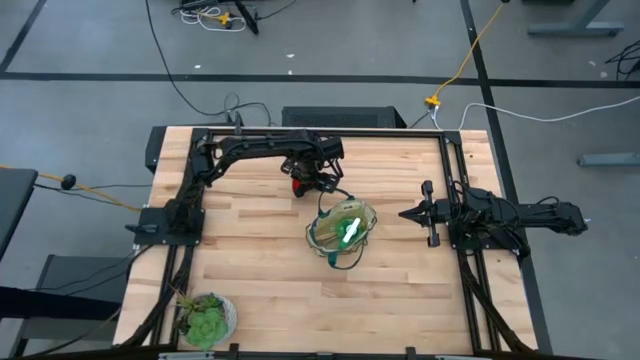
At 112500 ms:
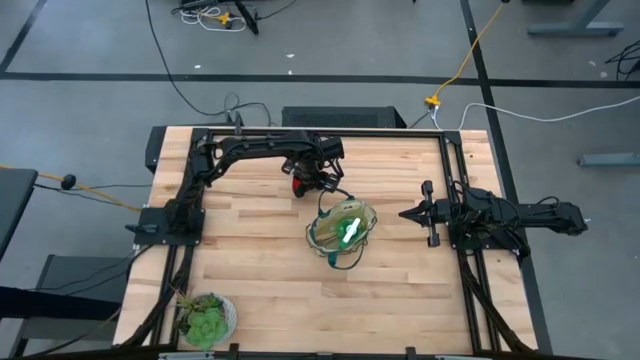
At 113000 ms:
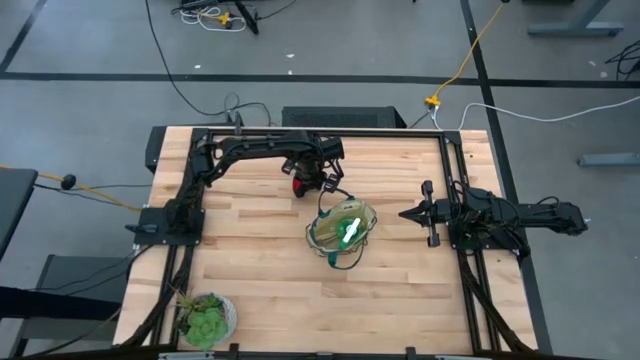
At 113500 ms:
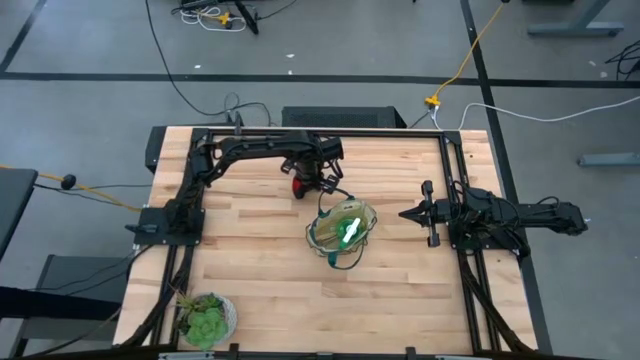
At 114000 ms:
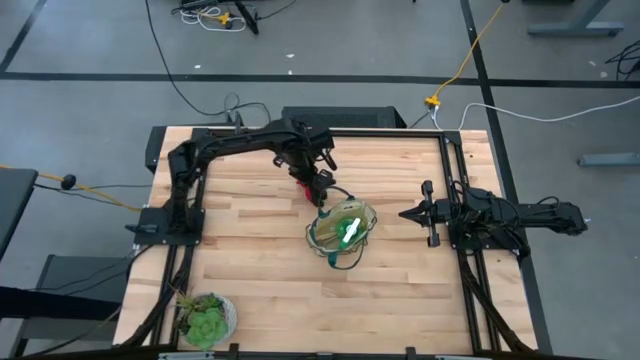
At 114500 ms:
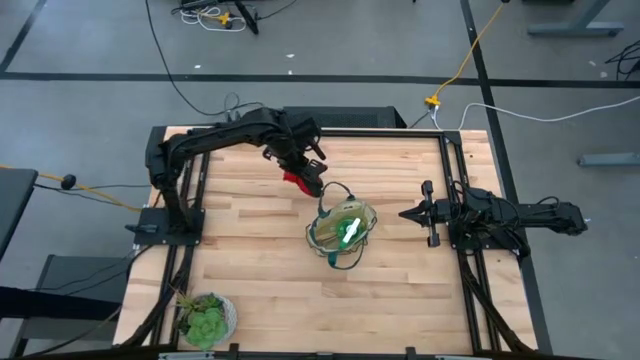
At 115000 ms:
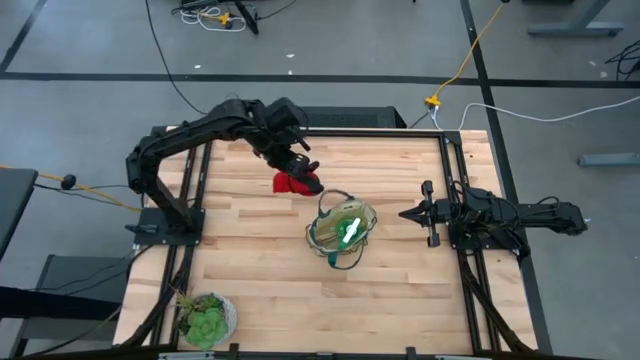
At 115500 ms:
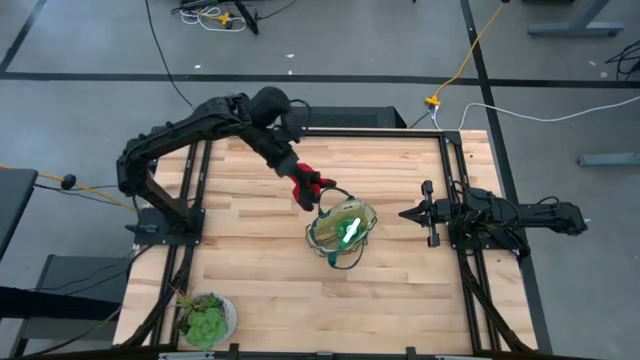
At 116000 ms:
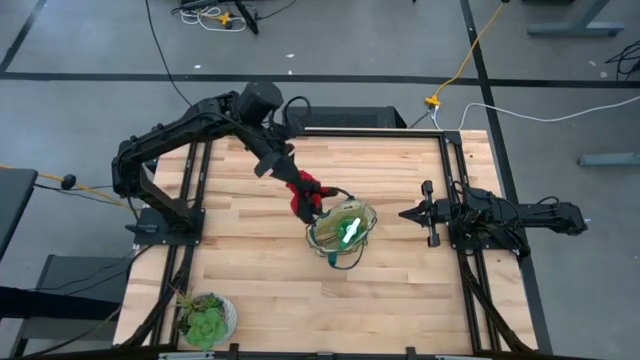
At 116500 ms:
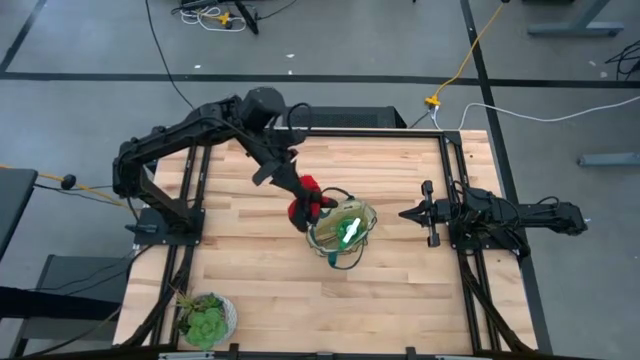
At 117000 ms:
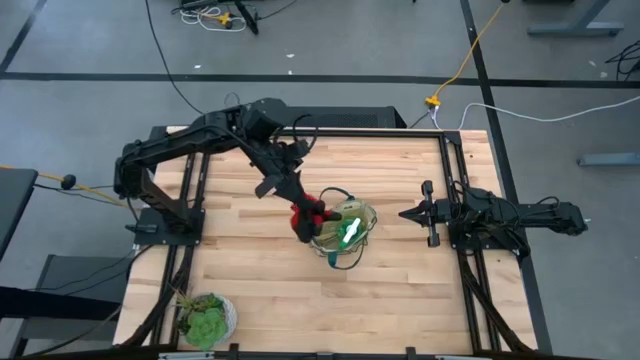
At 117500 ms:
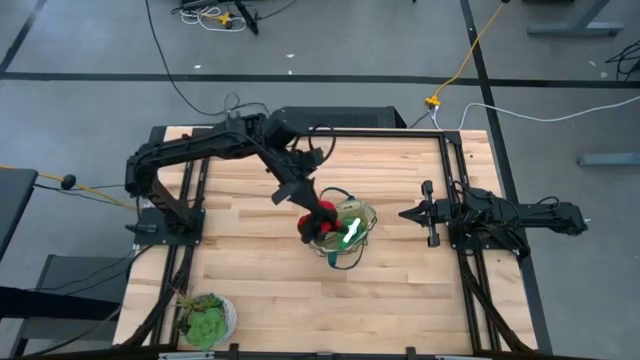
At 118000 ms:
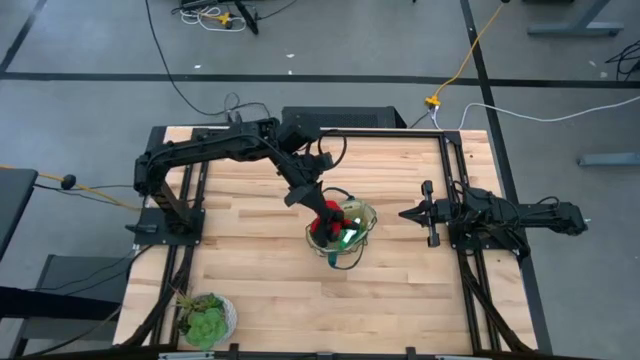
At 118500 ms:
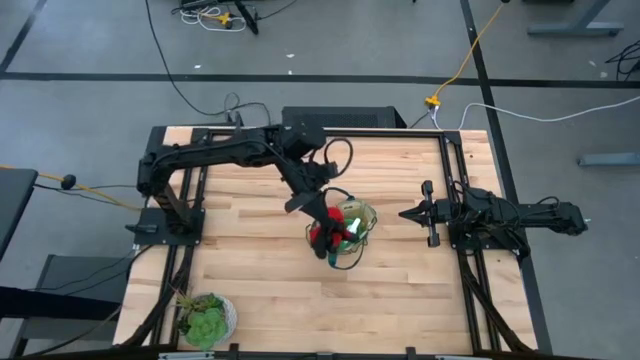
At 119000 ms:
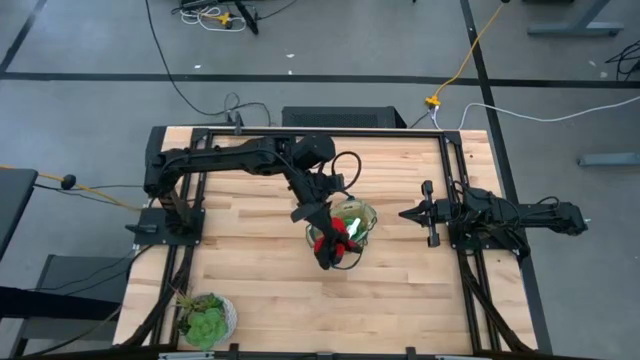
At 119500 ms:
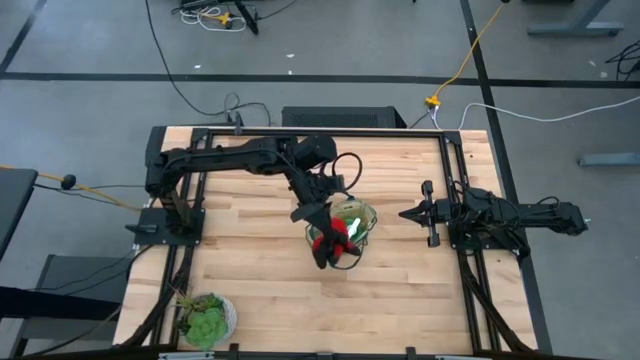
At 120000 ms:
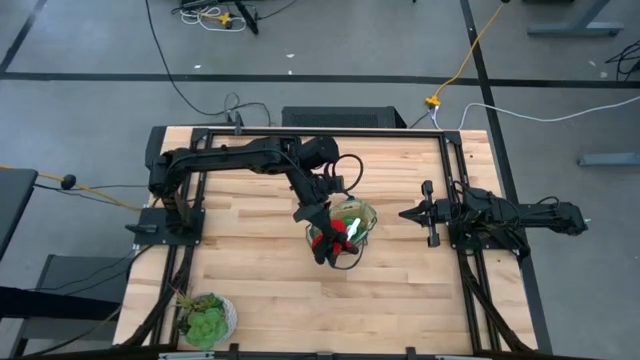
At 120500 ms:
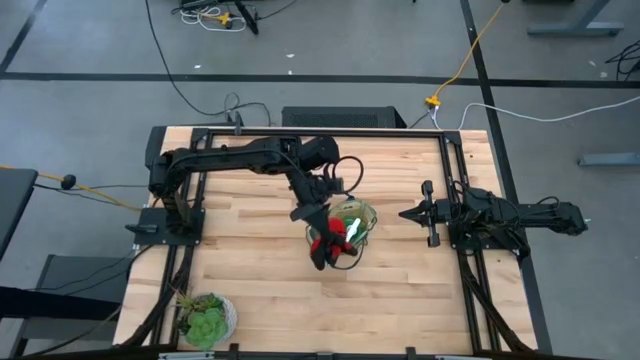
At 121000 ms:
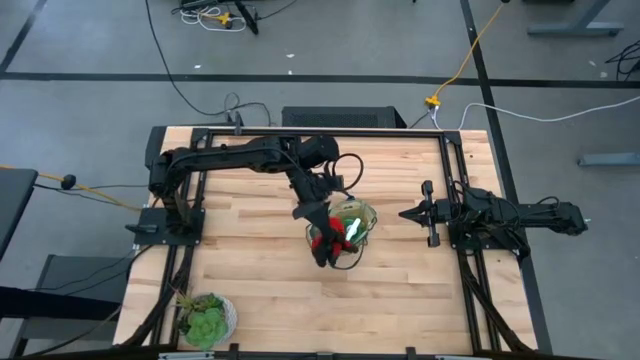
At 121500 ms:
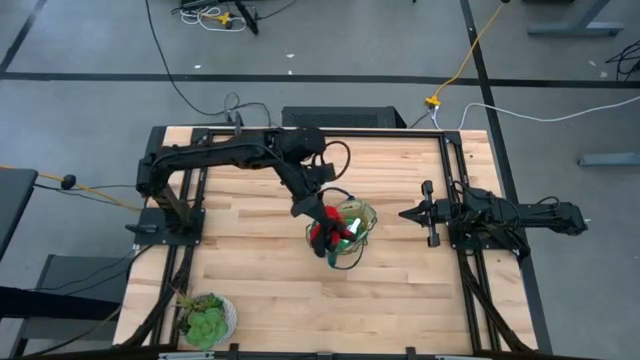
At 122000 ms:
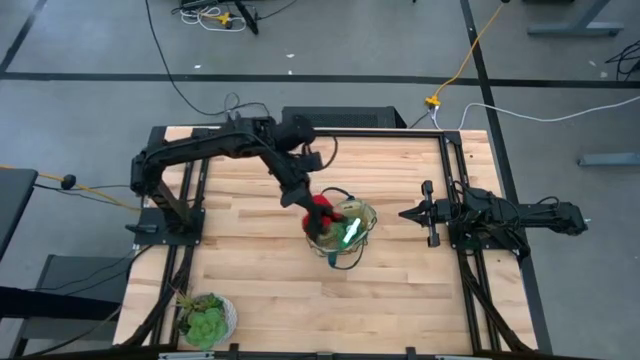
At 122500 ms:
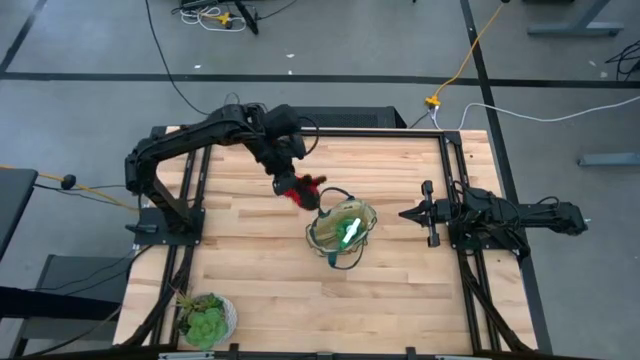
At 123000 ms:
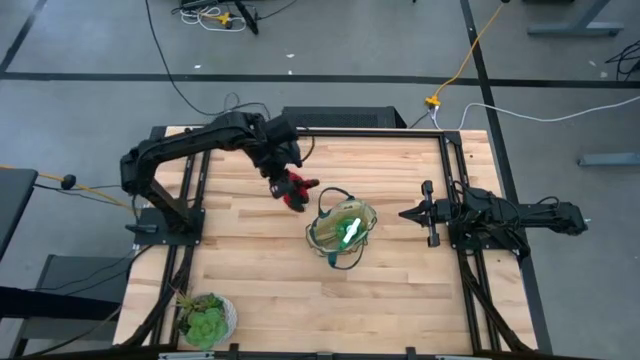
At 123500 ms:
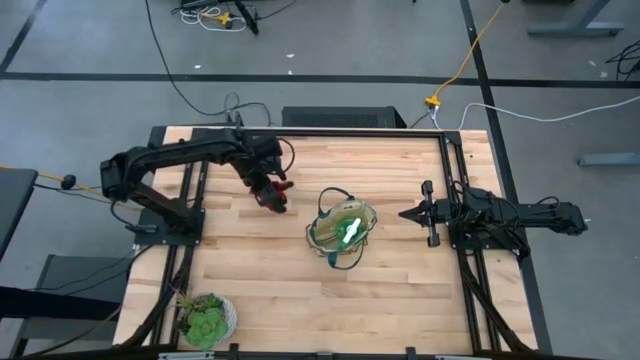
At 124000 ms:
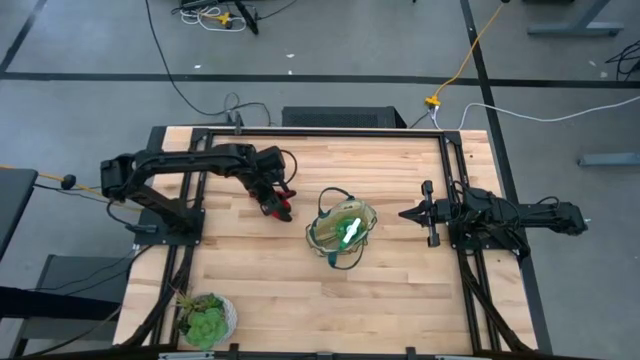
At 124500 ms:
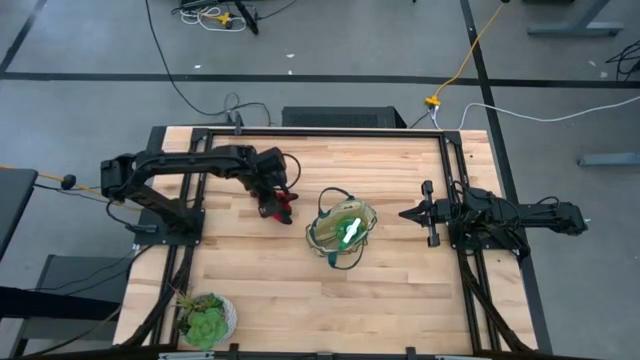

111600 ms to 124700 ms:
Task: Pick & Place Garden tools in Gardening bag
Put the red gloves into the light brown and green gardening bag

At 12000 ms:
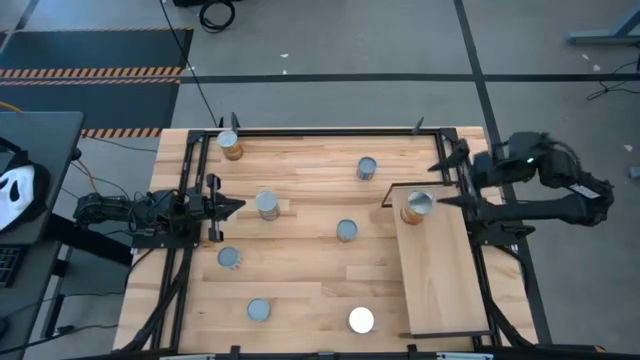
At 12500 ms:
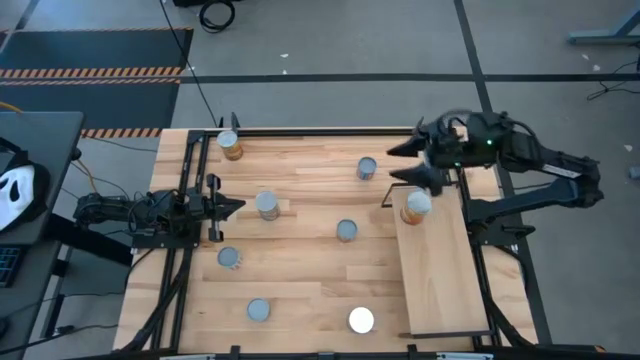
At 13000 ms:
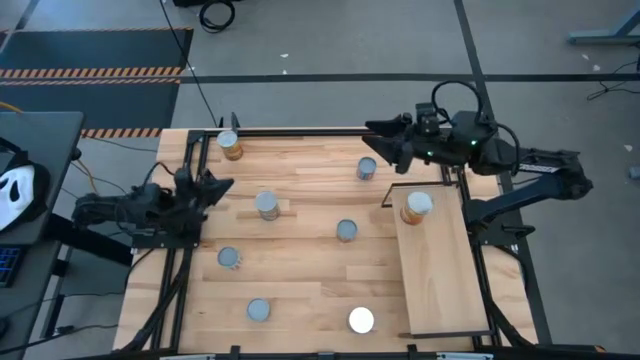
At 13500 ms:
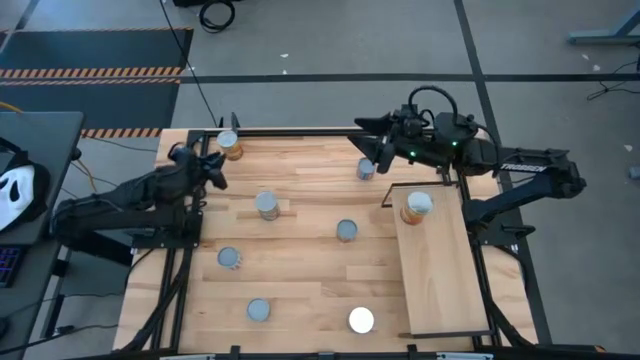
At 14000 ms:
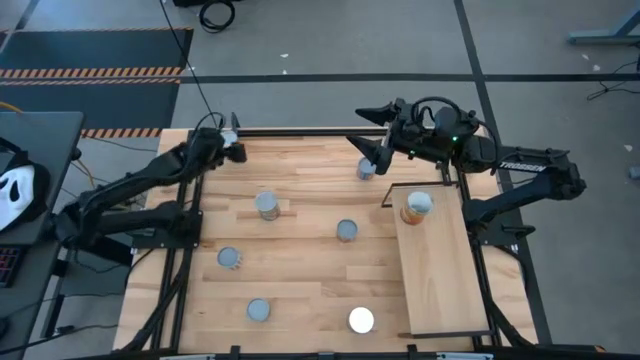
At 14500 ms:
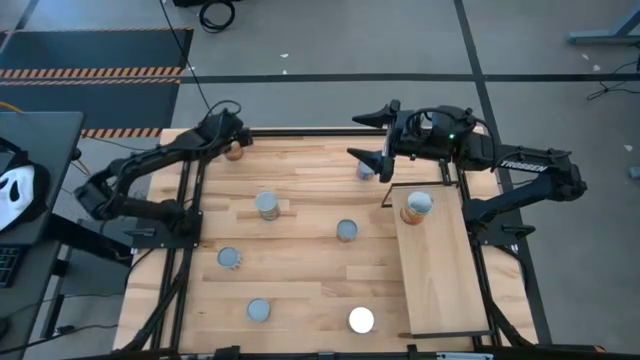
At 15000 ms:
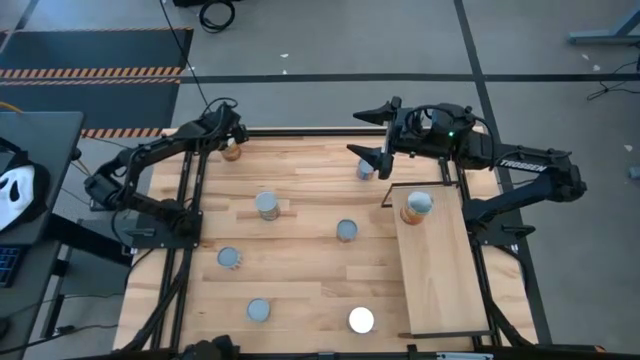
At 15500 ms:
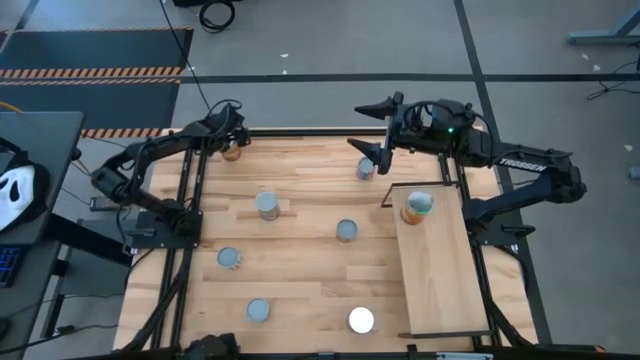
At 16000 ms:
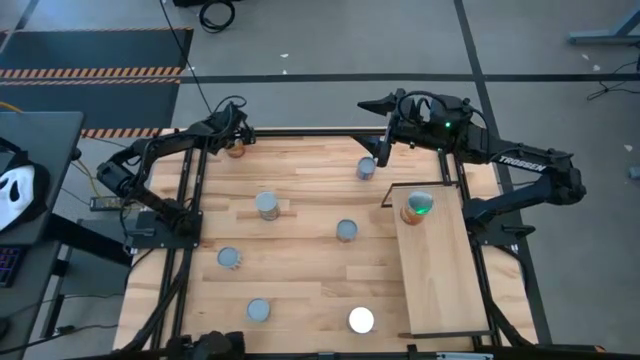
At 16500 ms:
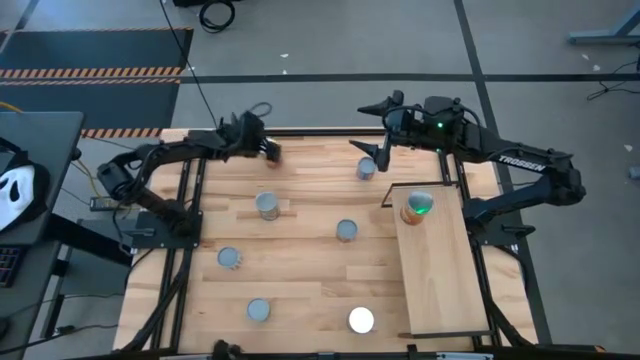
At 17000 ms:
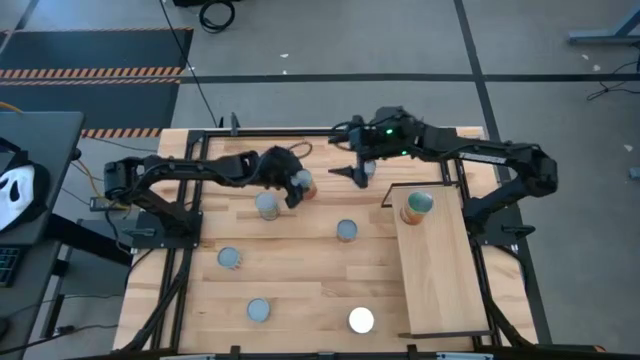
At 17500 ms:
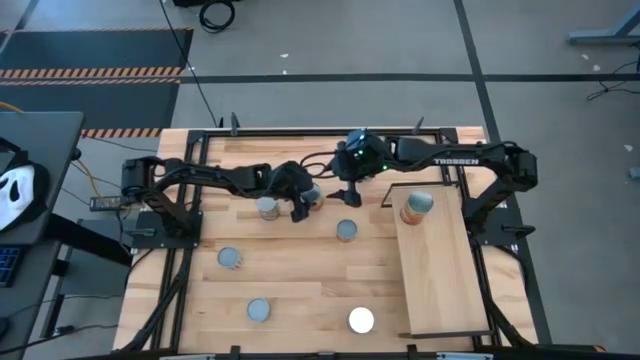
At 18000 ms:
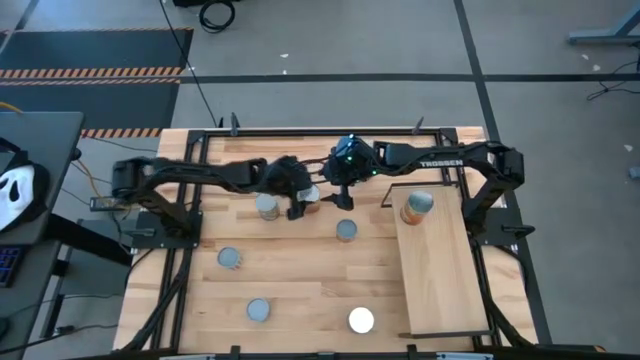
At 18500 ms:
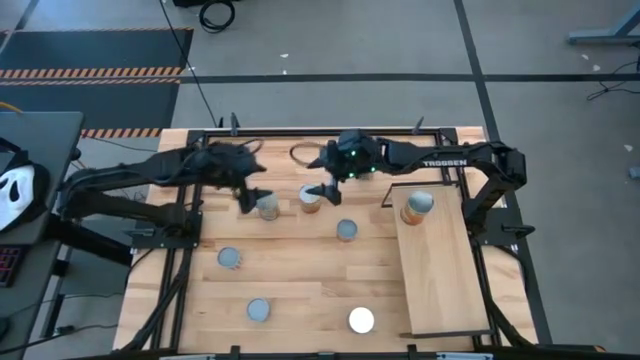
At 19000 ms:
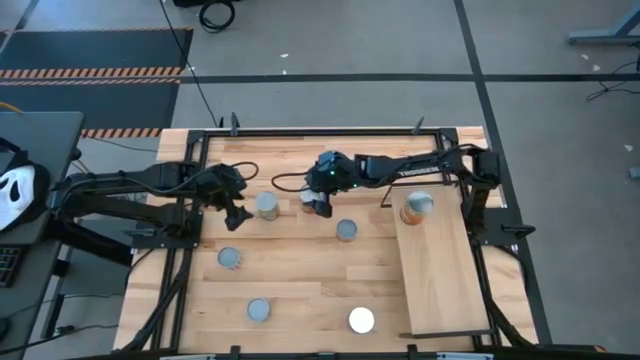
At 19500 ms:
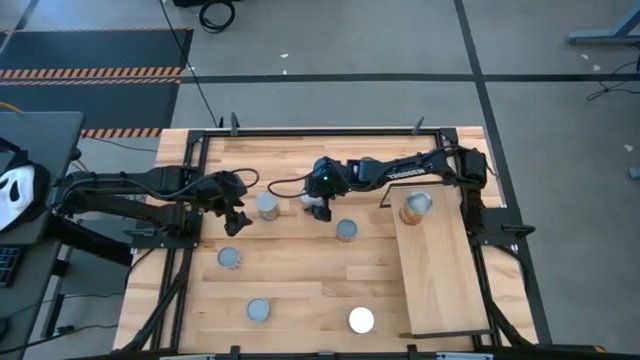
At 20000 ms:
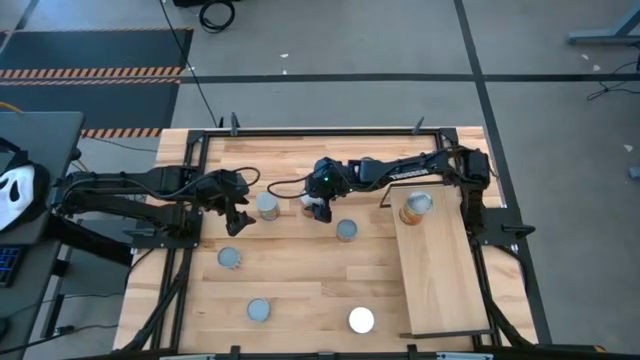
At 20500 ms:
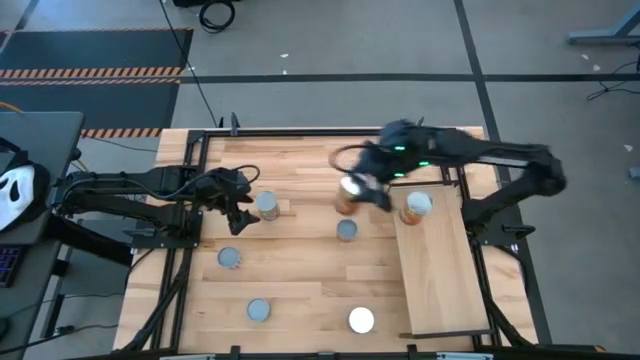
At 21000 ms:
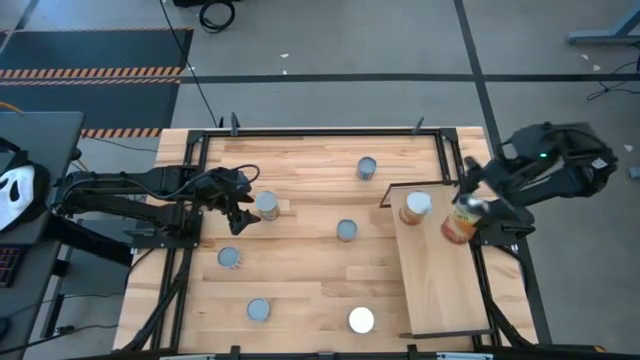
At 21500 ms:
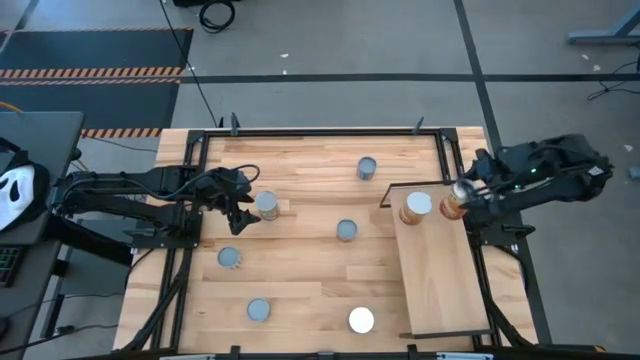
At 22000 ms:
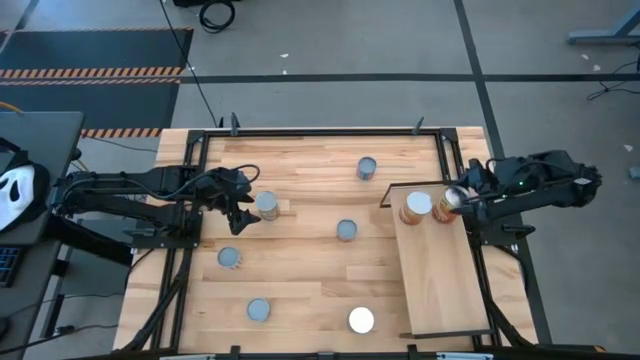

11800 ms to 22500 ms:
Task: Pick and place cans onto a shelf
Put the large canned corn on the shelf aligned with the other canned corn
